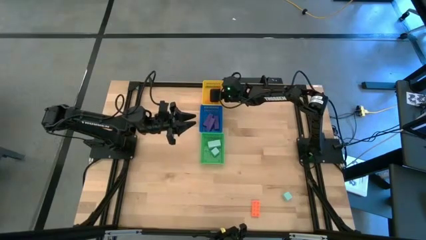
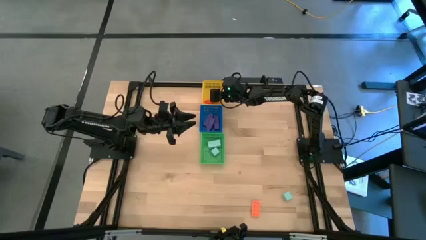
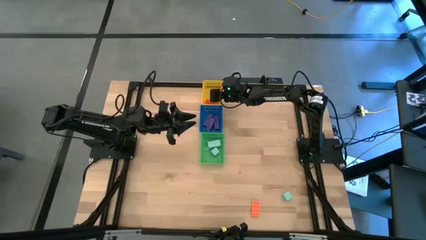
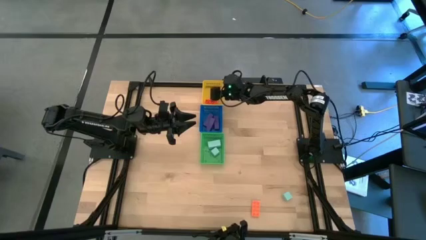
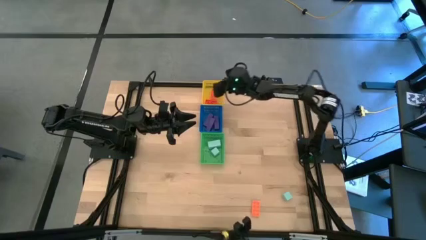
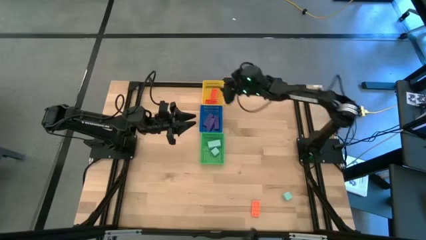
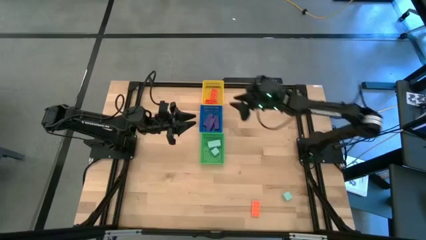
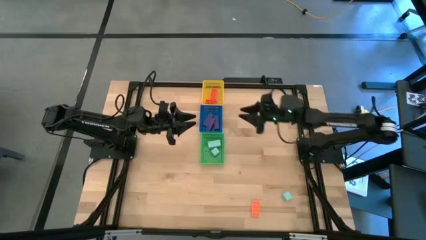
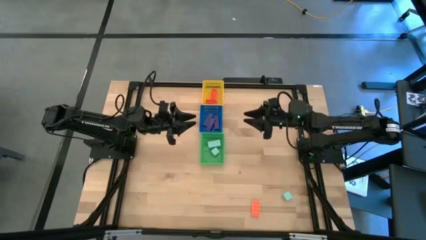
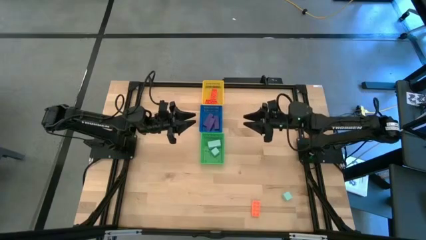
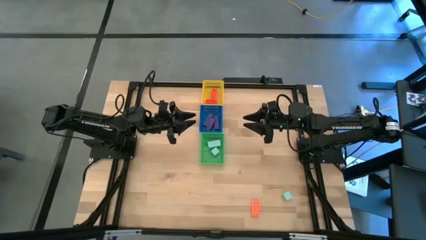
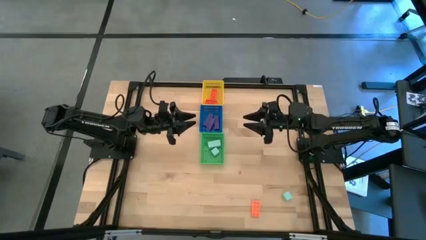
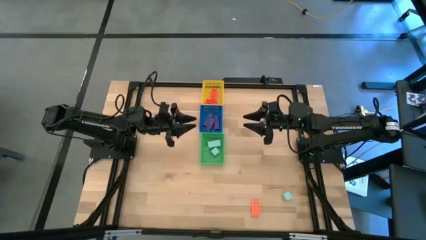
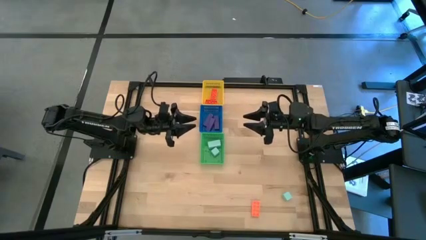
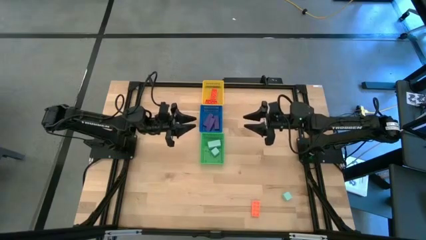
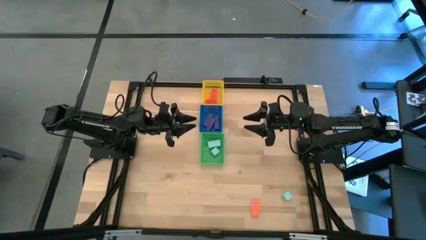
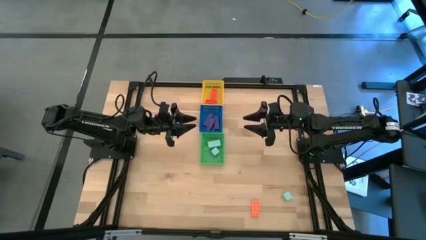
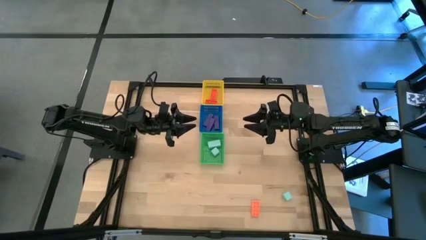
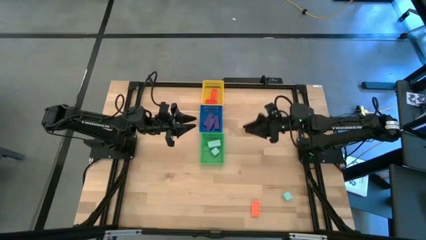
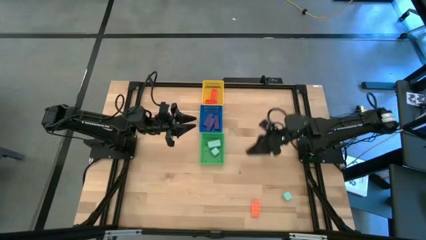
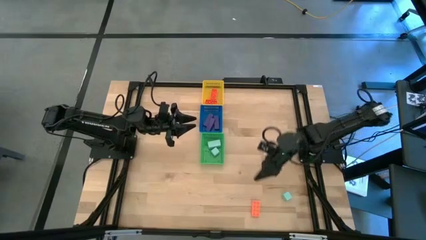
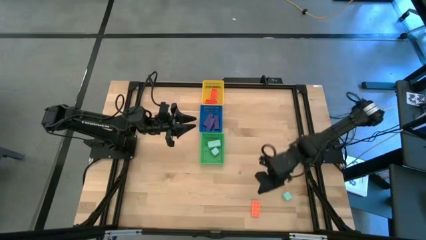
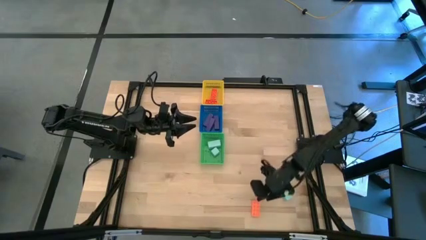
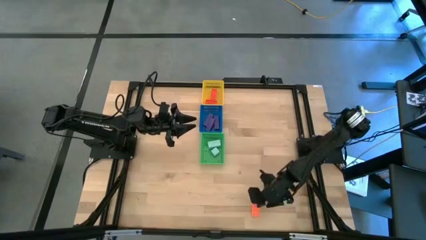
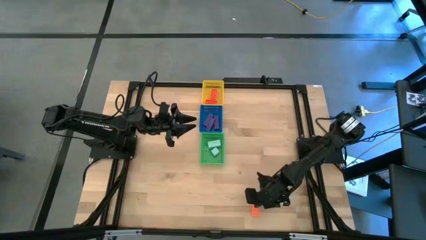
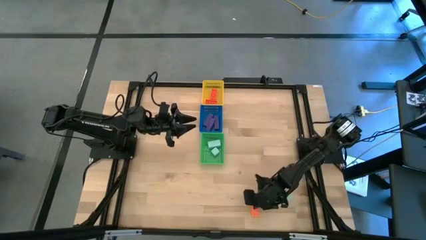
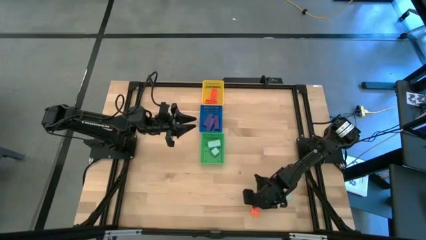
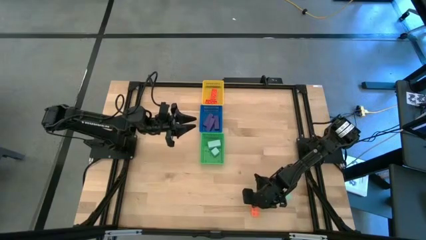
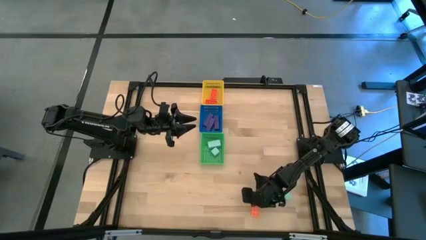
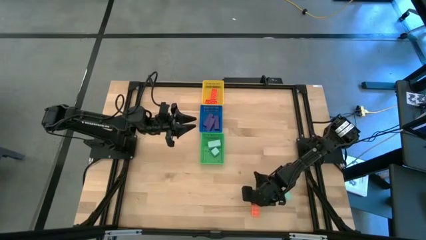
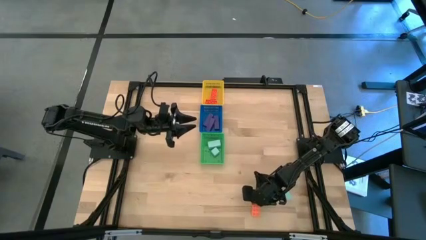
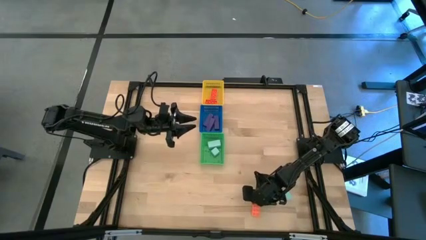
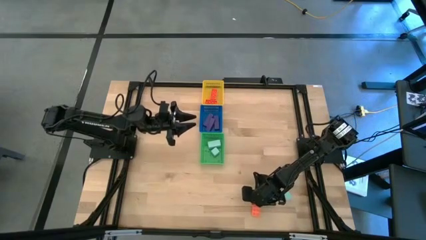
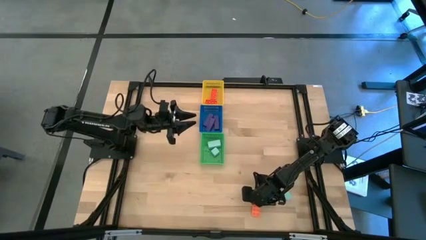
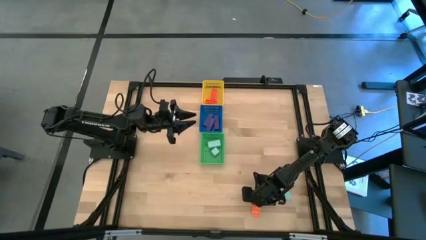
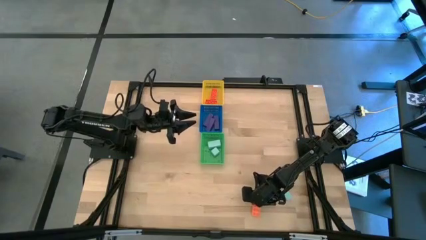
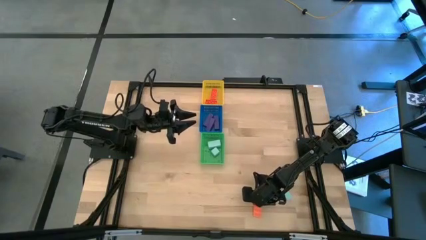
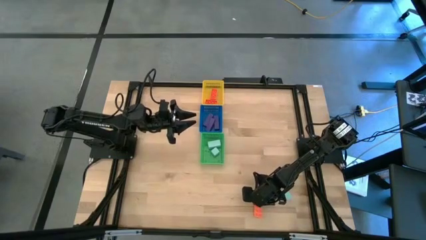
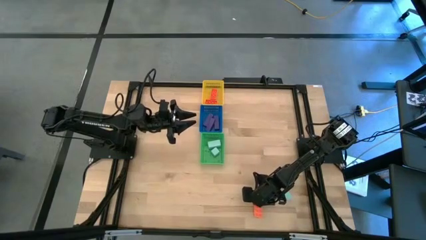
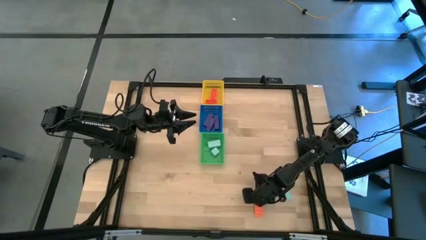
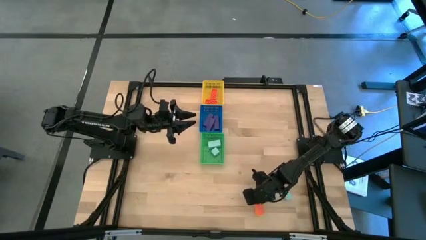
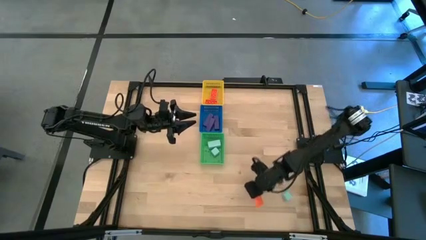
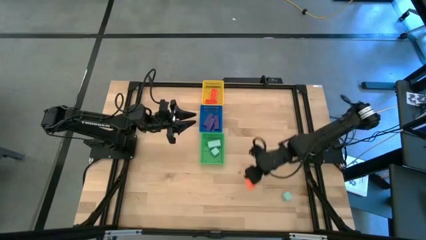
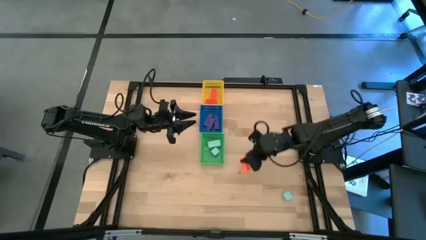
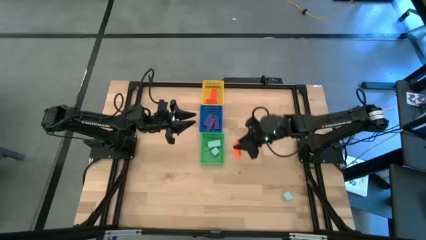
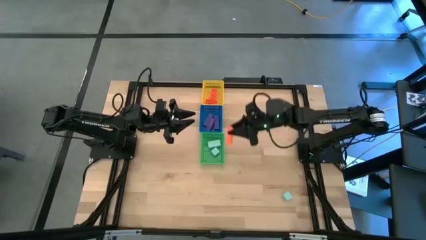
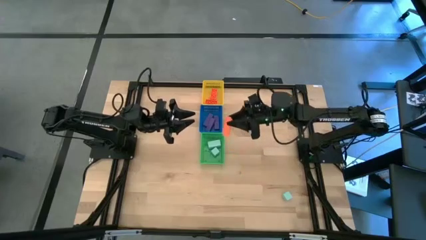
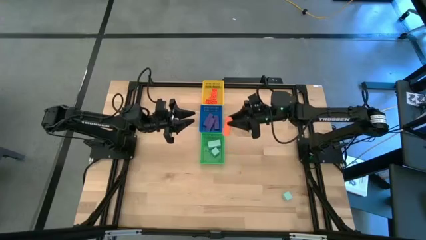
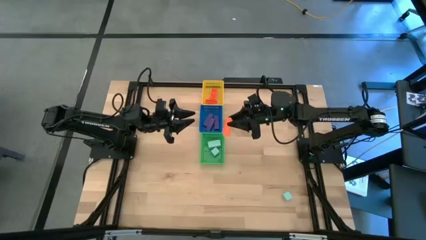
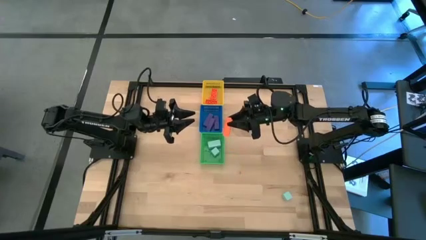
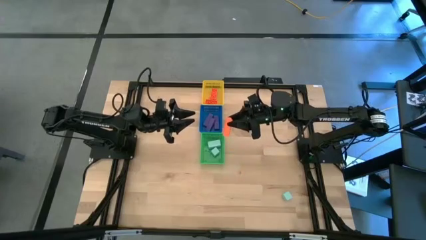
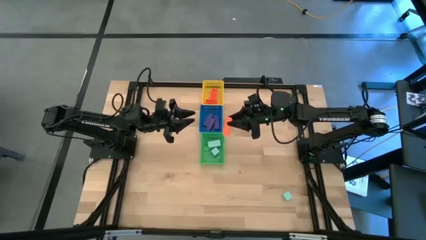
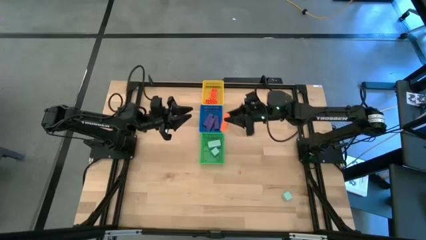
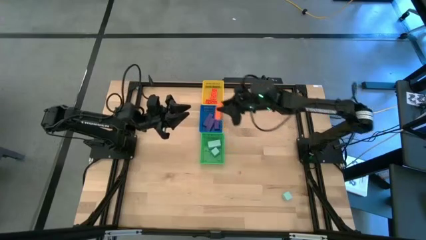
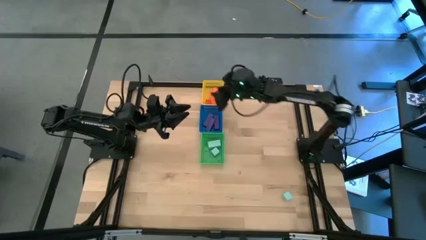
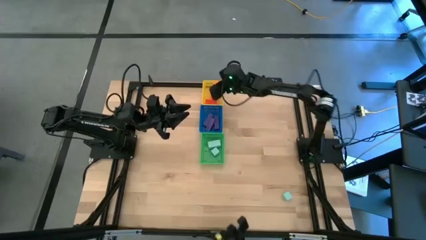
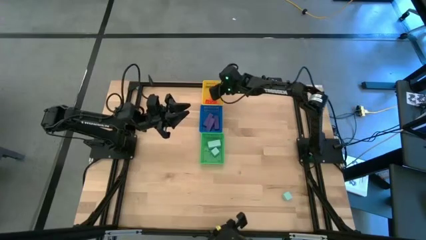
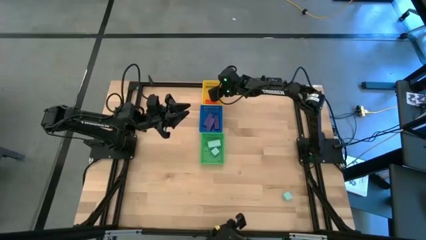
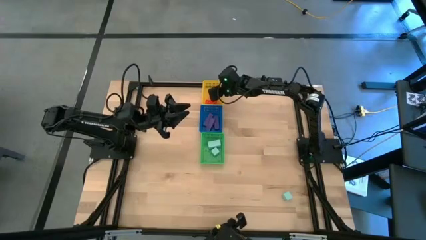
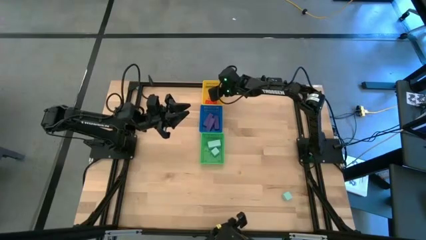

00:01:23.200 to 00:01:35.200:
Task: Sort & place blocks by color
Put the orange game piece into the yellow basket

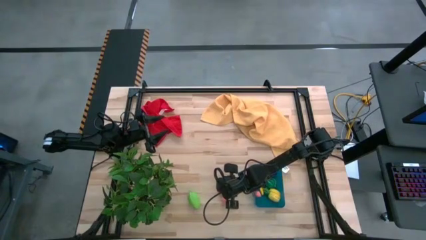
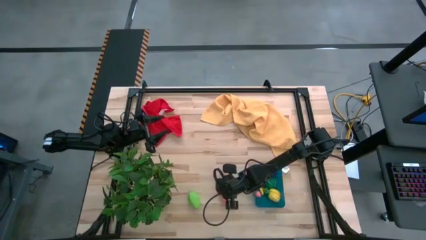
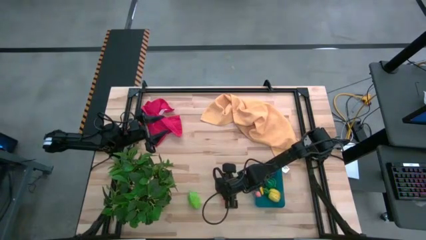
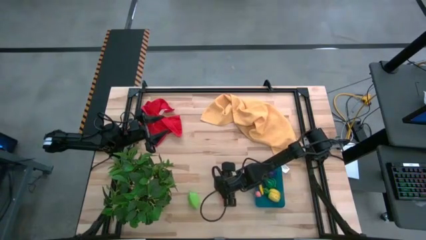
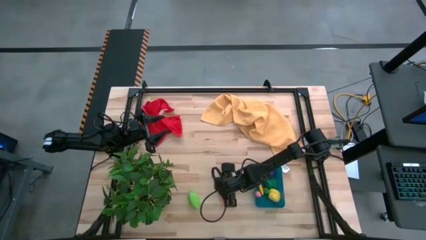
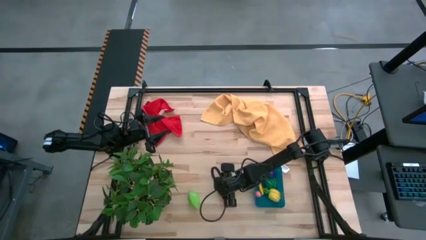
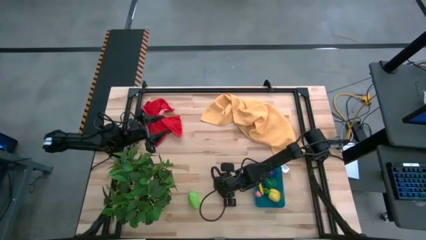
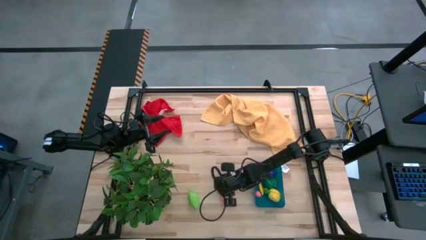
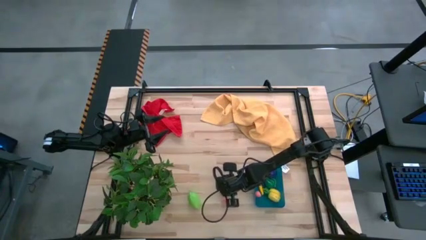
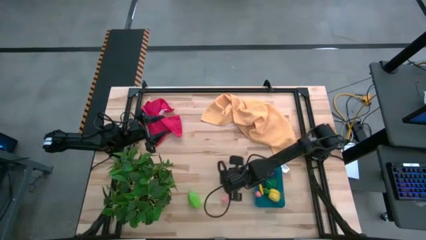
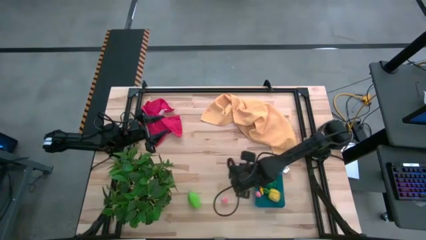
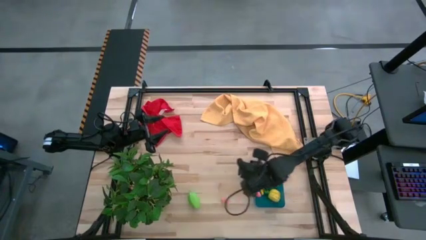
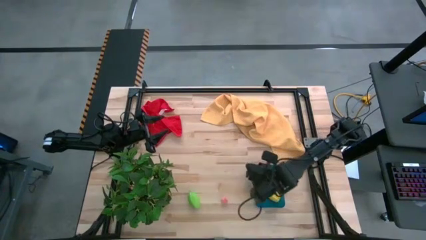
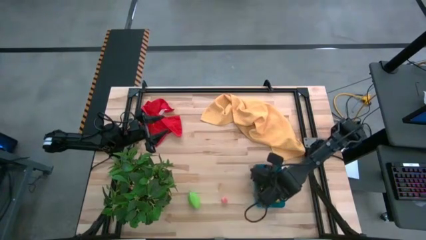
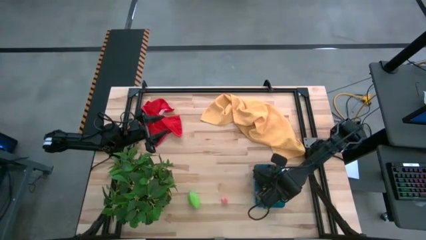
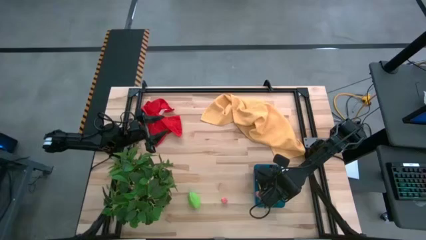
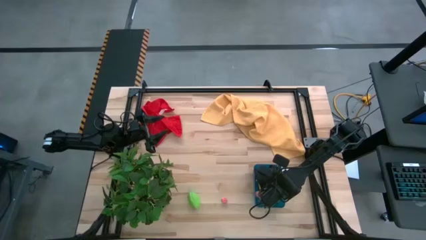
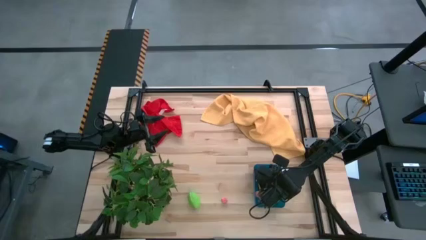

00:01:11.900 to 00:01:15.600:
Task: Pick and placing Produce into tupperware
Put the red raspberry into the blue bin
